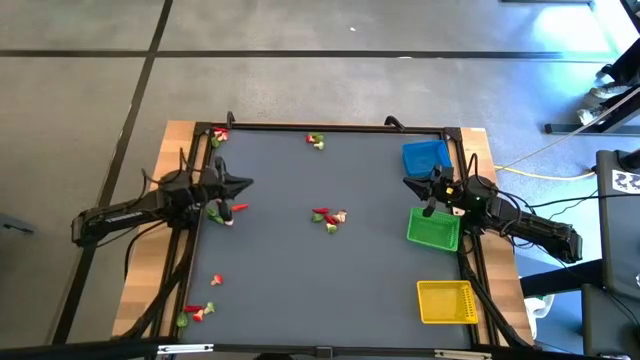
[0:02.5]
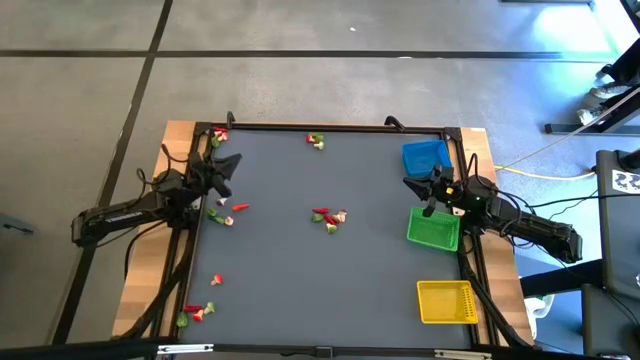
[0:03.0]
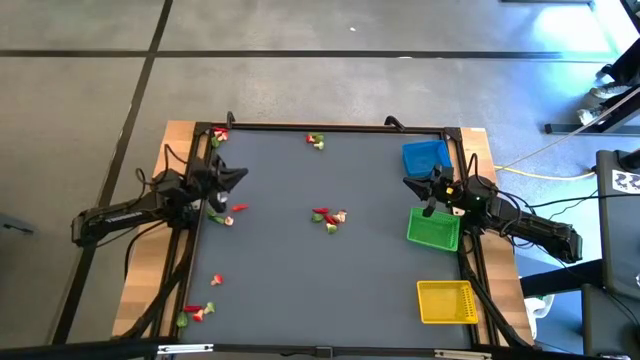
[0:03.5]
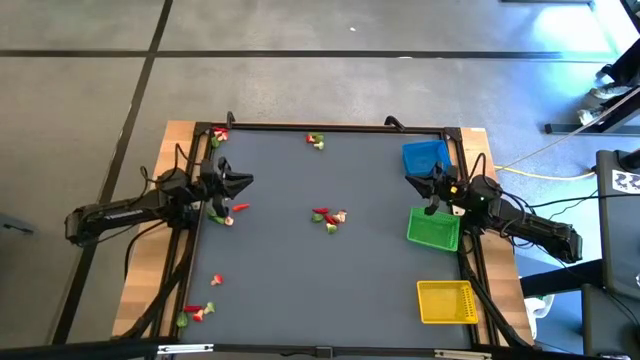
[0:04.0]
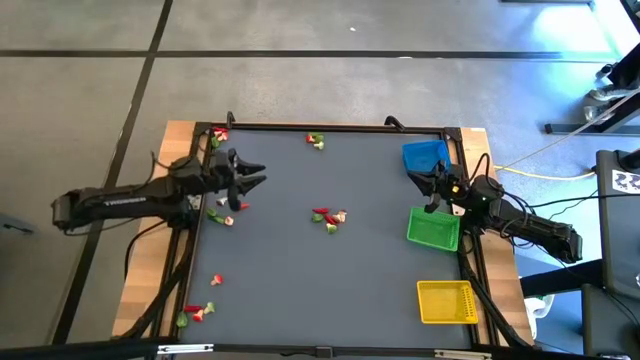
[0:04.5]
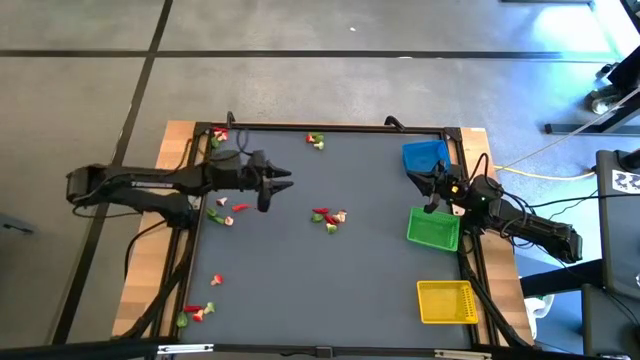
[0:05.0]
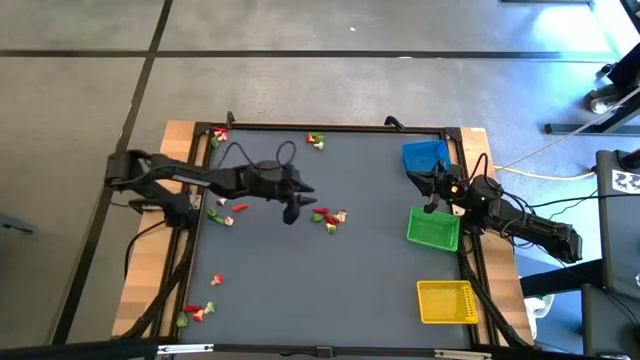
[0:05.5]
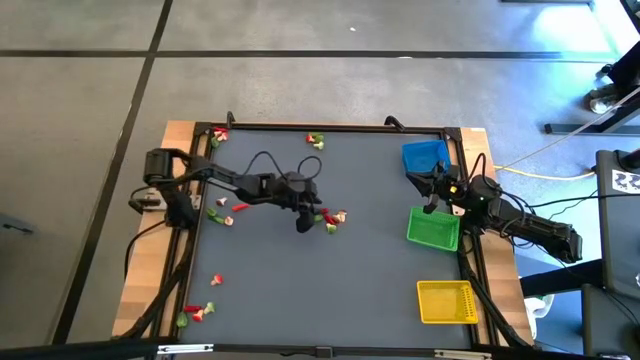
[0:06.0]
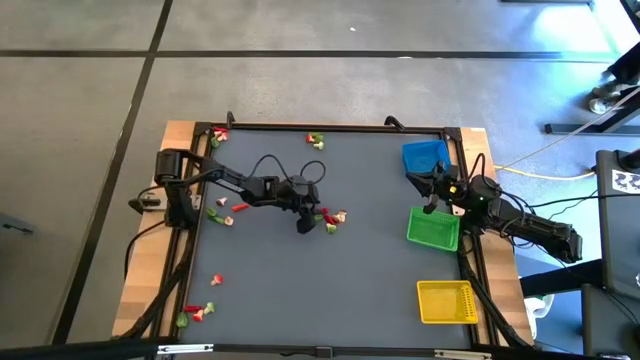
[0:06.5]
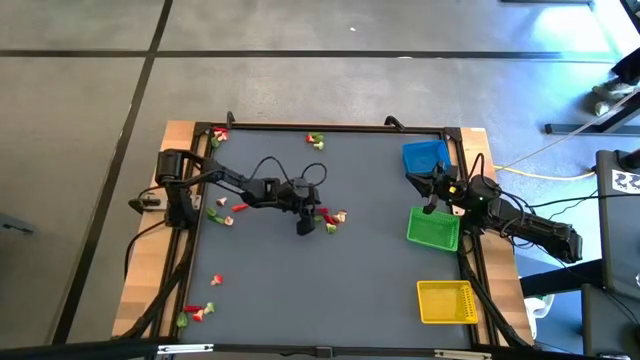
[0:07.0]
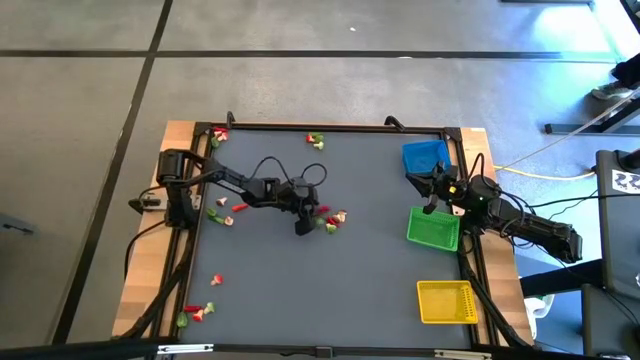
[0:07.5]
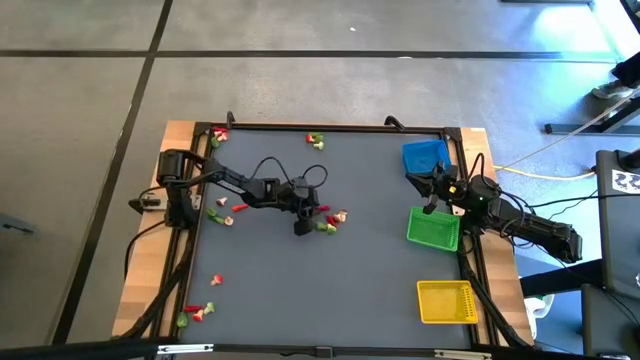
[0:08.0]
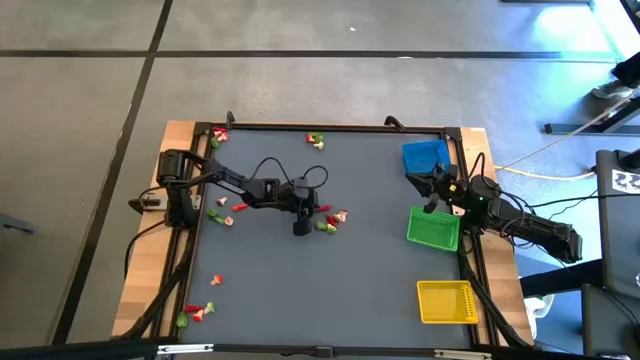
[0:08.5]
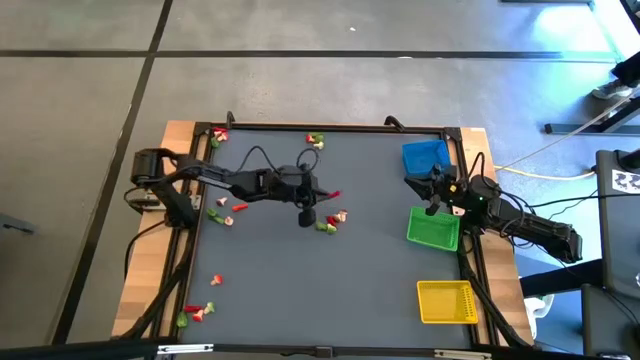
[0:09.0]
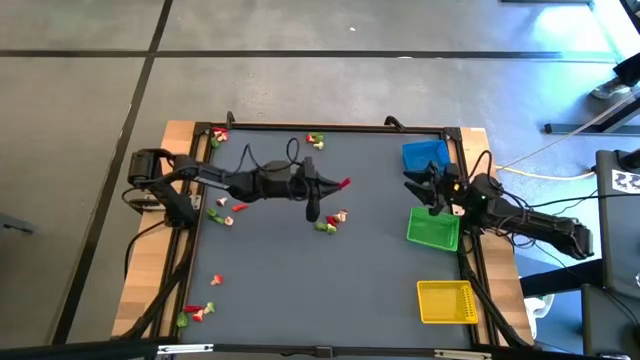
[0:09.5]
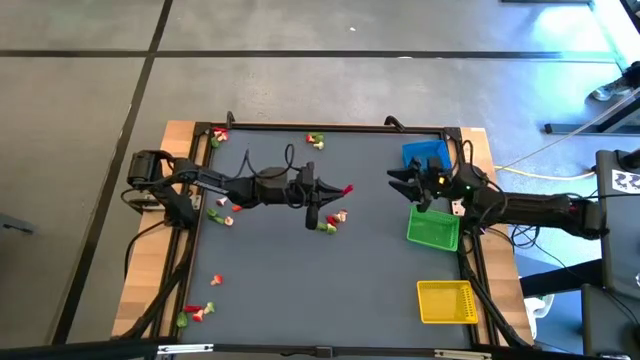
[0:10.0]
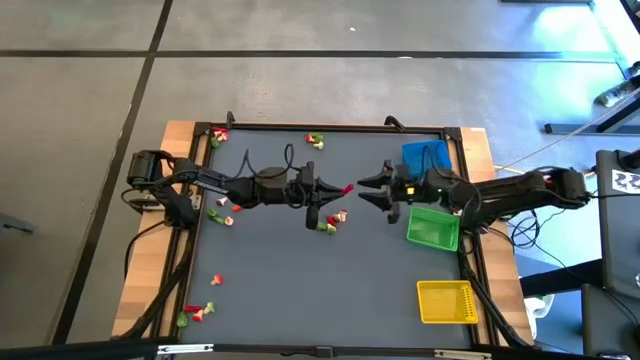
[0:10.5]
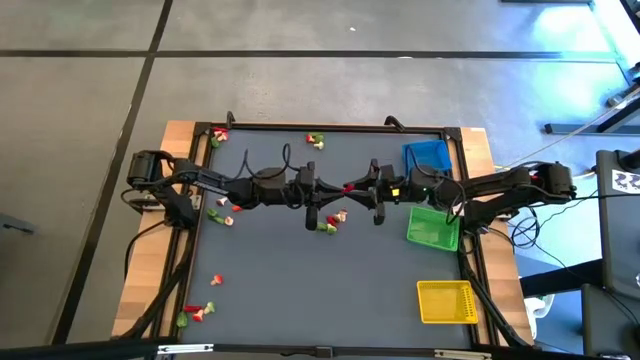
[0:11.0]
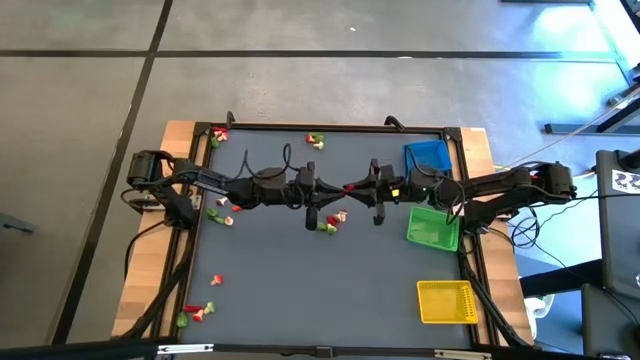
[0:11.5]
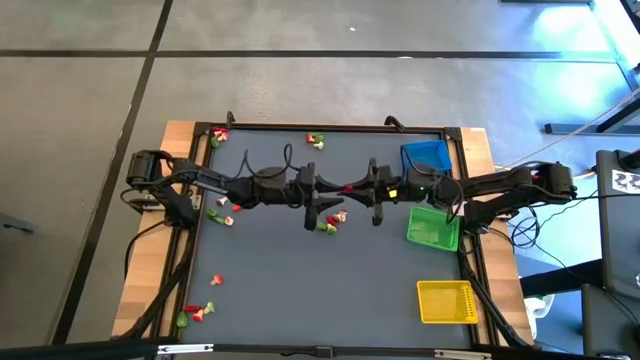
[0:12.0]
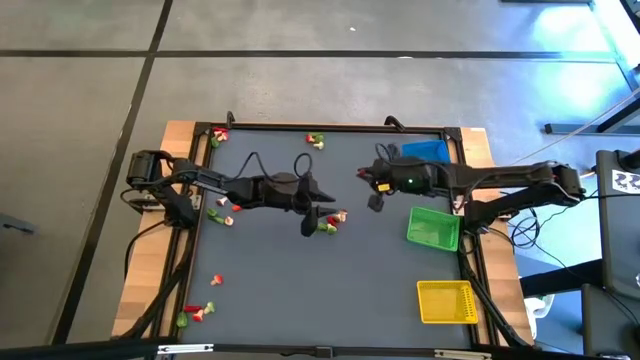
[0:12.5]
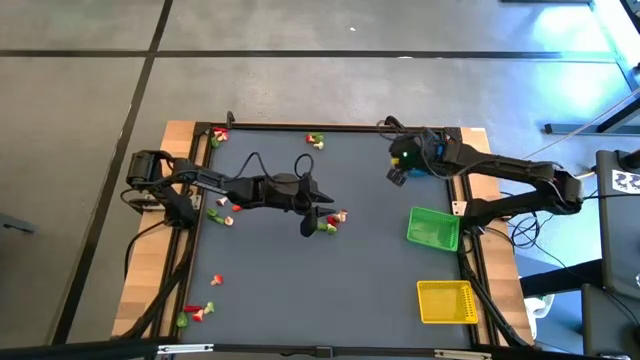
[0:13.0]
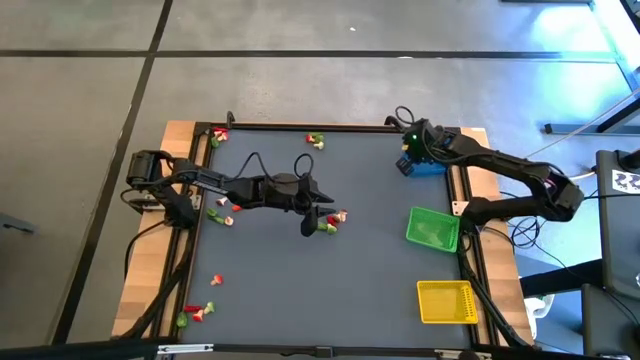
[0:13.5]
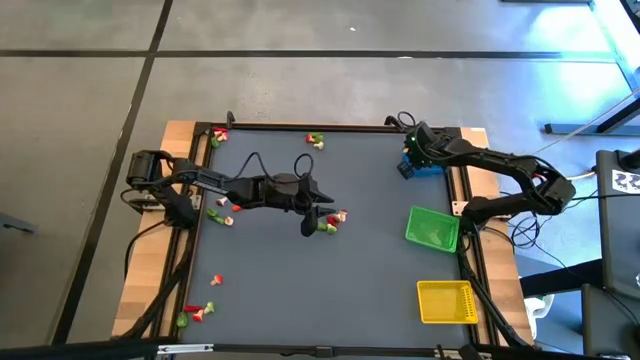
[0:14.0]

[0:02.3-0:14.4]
Task: Sort produce into baskets
Put the red chili pepper into the blue basket

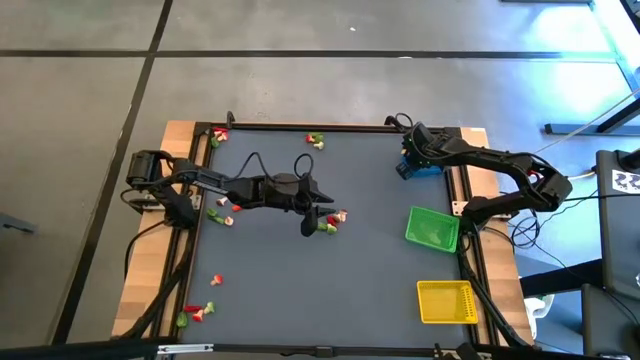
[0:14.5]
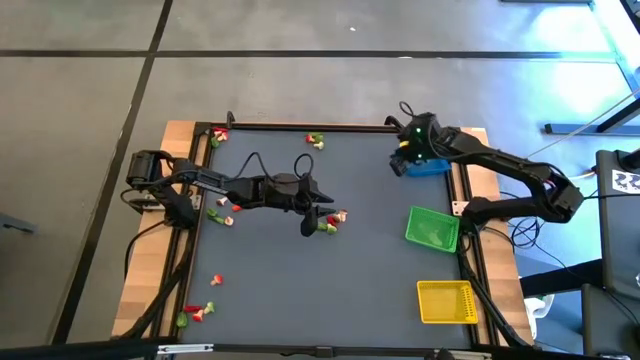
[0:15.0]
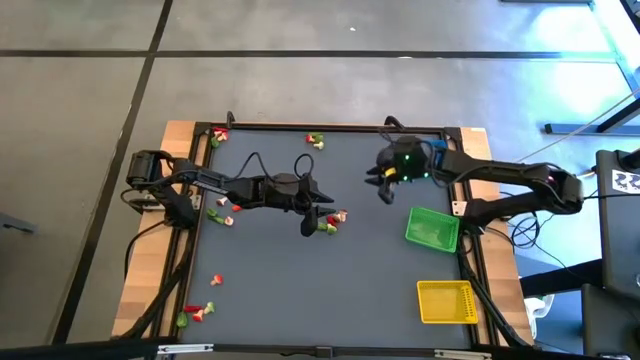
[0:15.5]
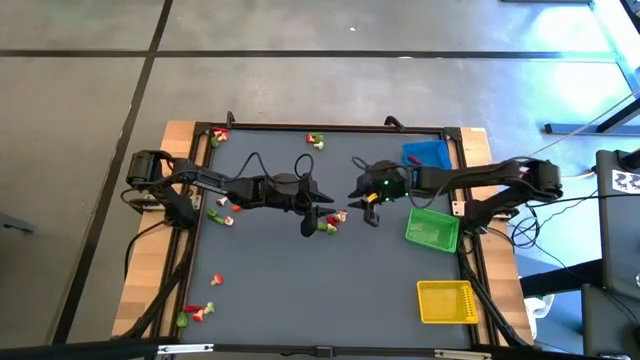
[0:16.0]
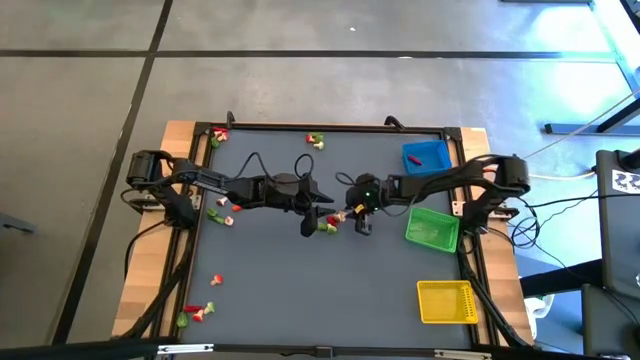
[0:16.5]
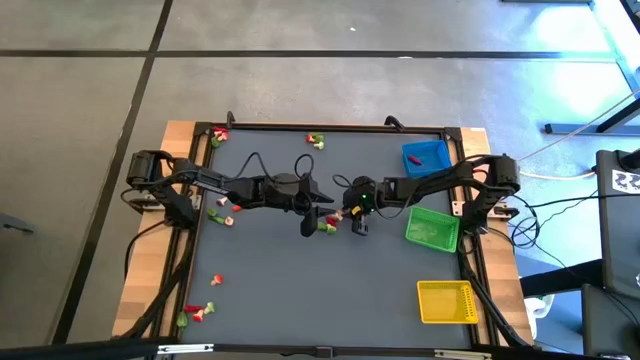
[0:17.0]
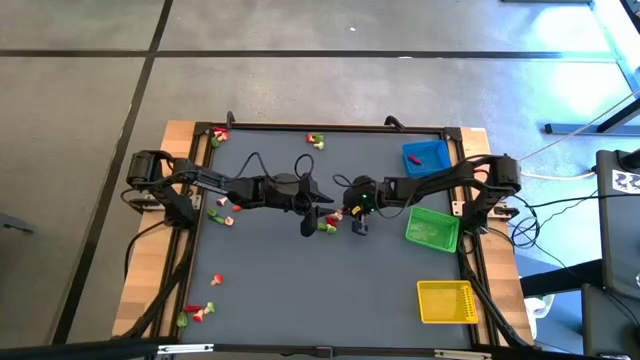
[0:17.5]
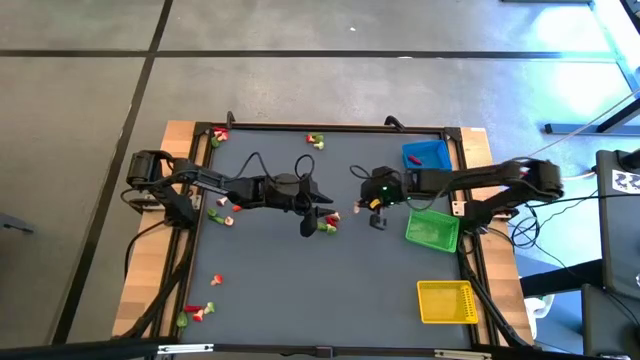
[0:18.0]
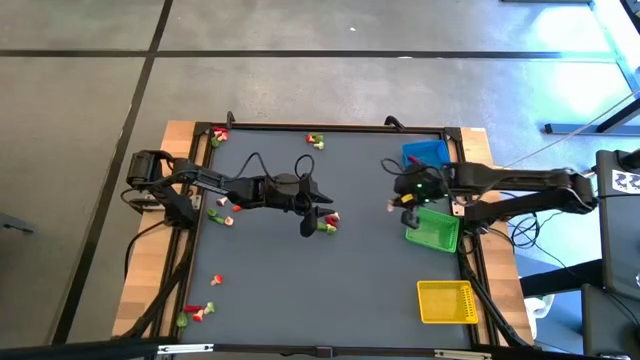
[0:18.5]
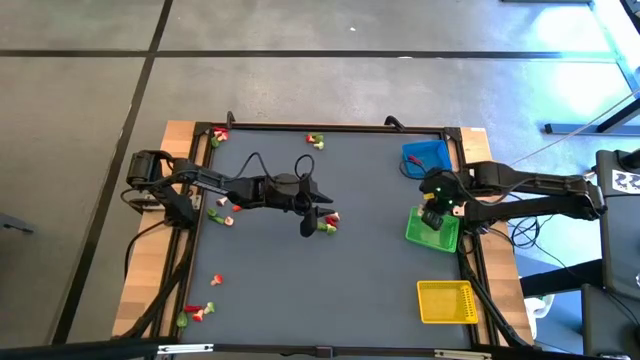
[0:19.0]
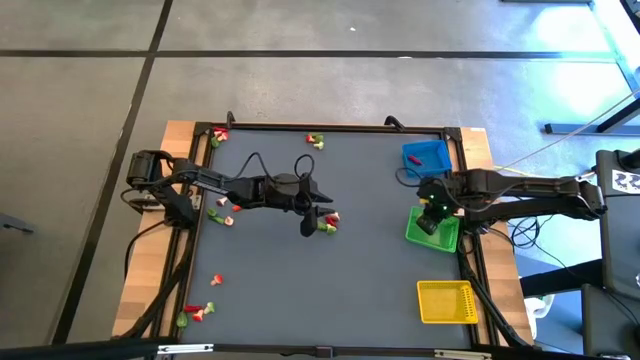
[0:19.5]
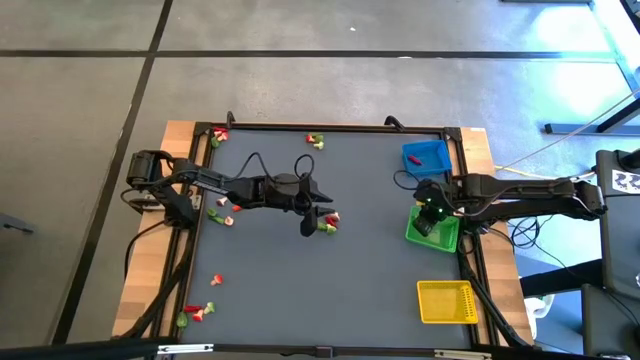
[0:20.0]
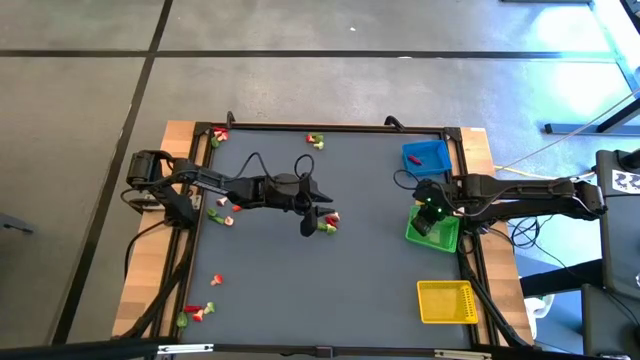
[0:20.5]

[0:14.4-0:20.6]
Put the brown mushroom into the green basket

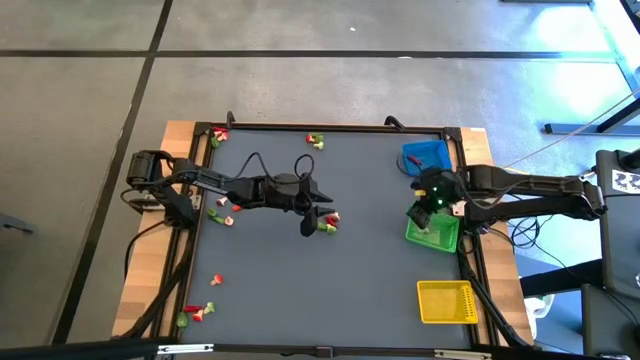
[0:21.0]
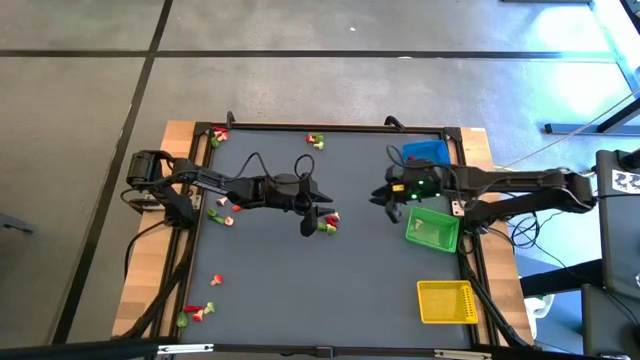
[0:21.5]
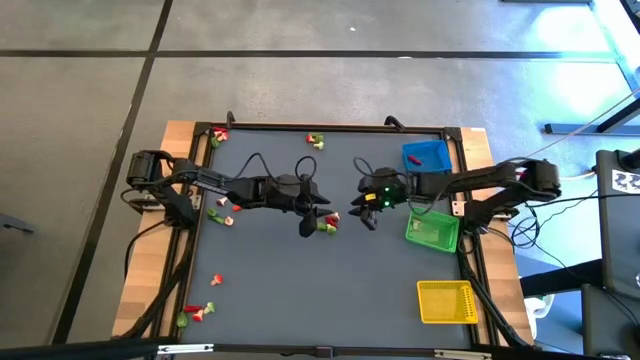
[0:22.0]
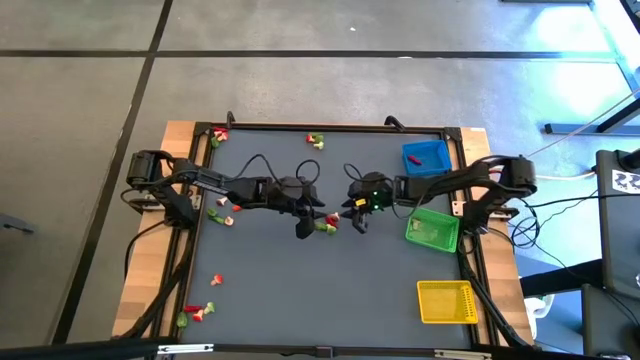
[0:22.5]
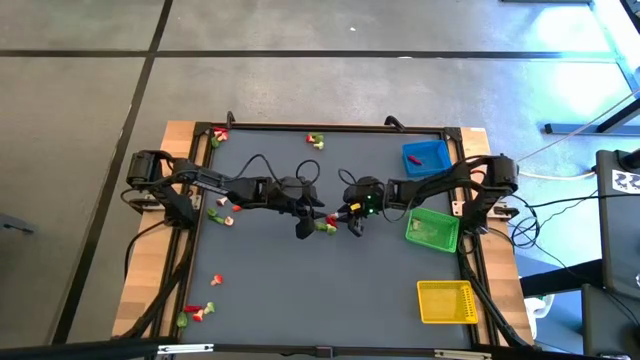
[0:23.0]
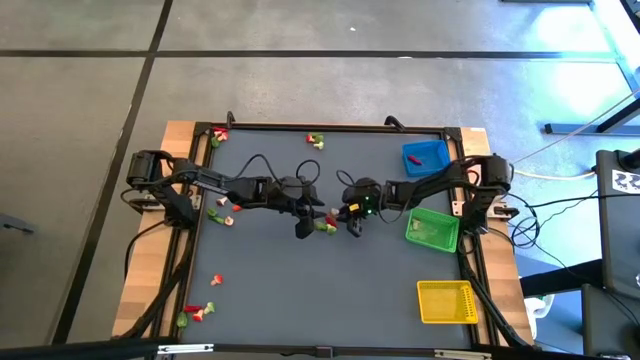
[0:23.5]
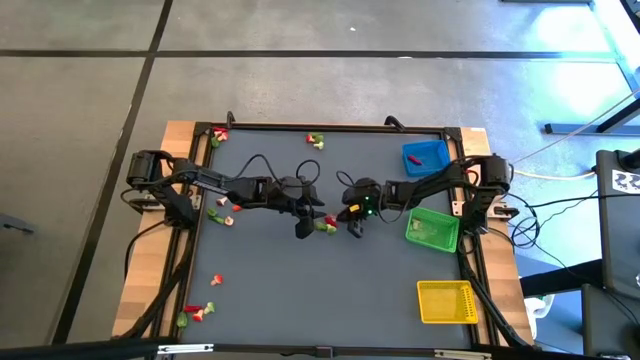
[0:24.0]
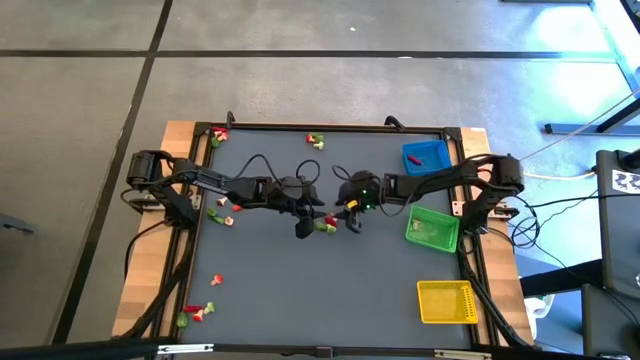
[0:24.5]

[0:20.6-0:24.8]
Put the brown mushroom into the green basket
